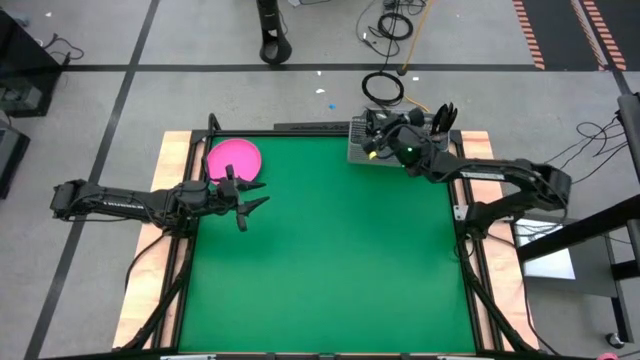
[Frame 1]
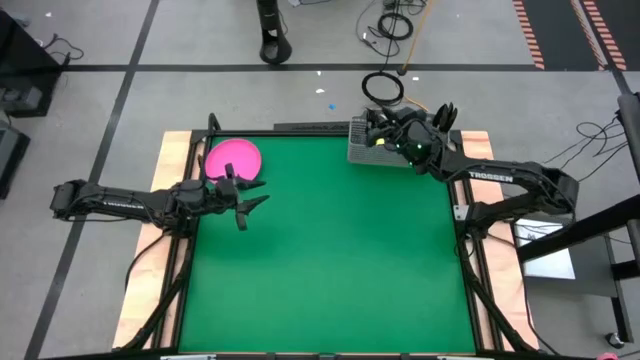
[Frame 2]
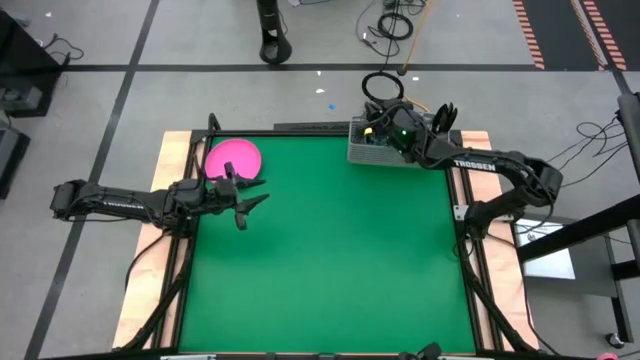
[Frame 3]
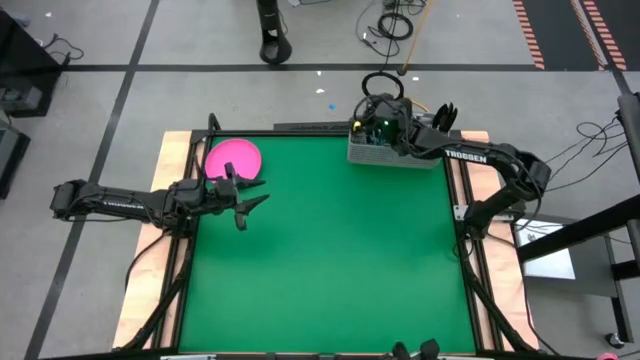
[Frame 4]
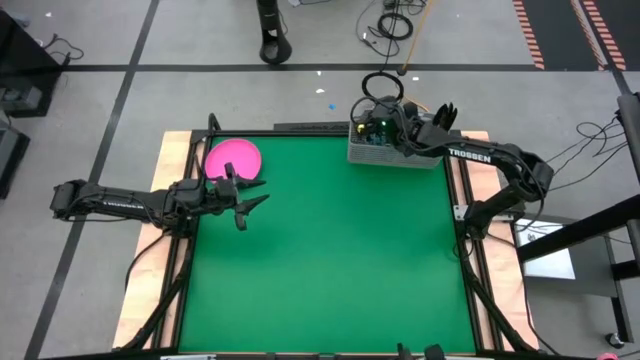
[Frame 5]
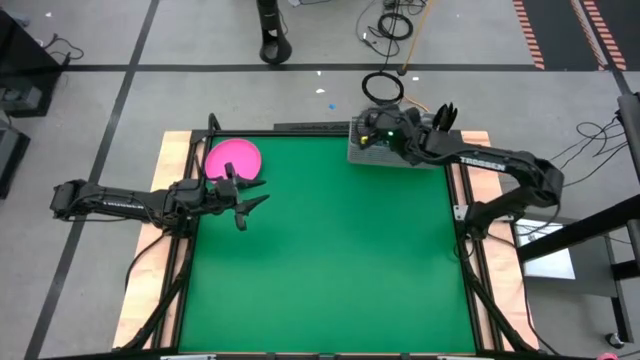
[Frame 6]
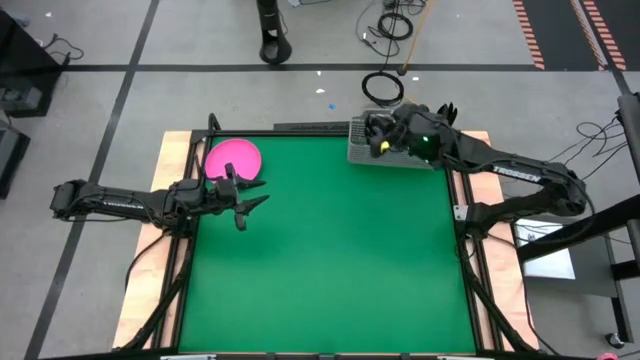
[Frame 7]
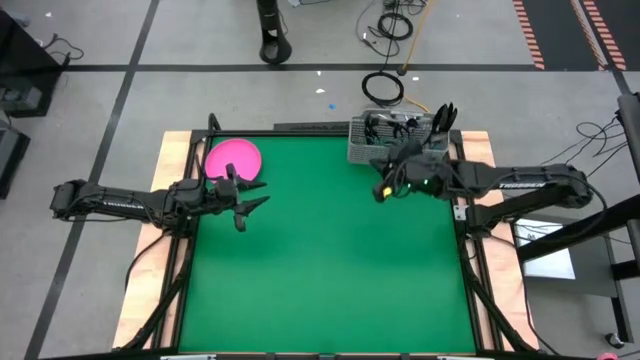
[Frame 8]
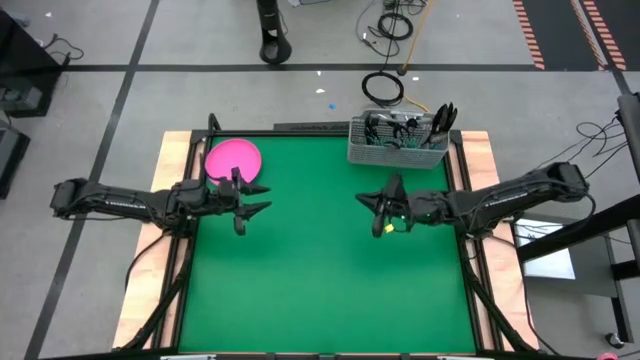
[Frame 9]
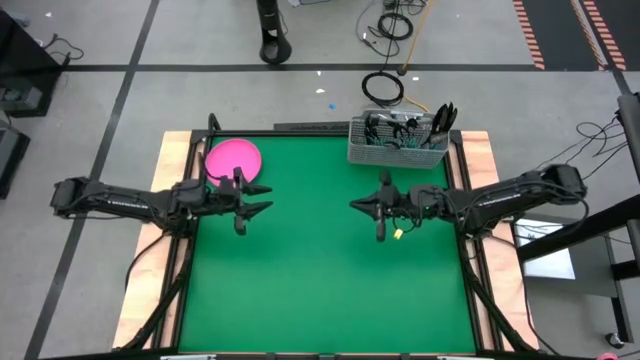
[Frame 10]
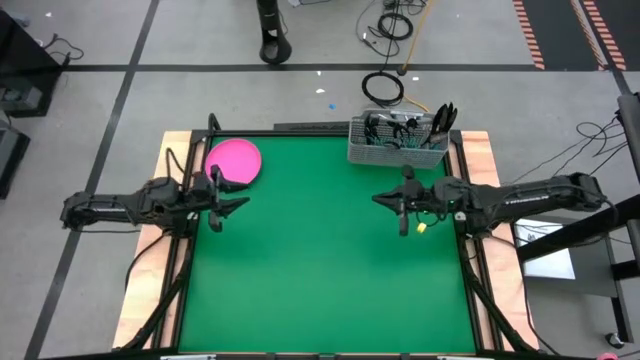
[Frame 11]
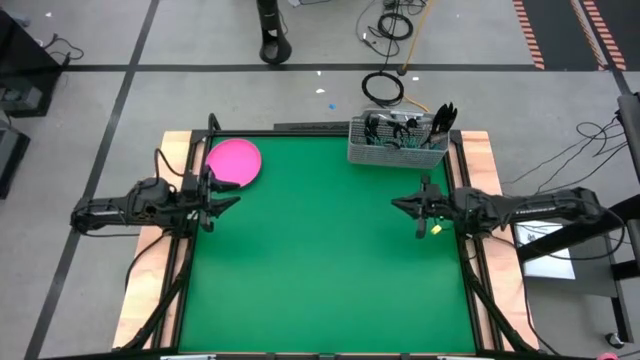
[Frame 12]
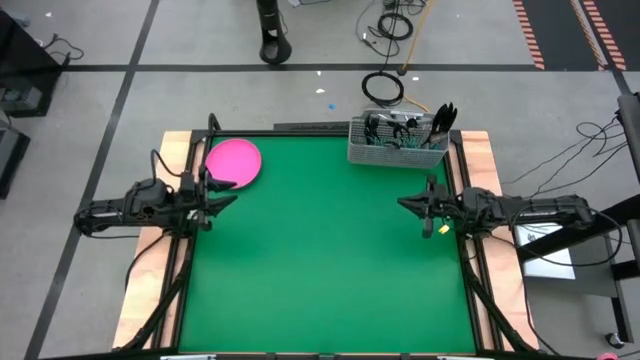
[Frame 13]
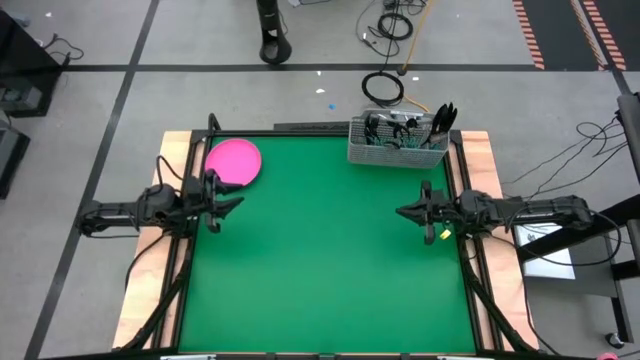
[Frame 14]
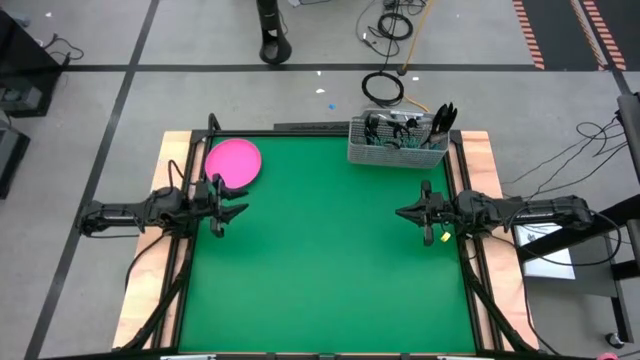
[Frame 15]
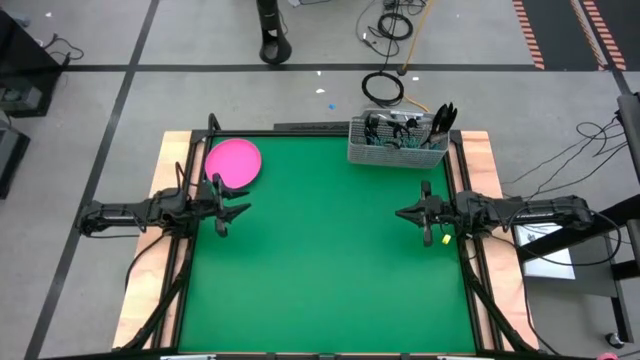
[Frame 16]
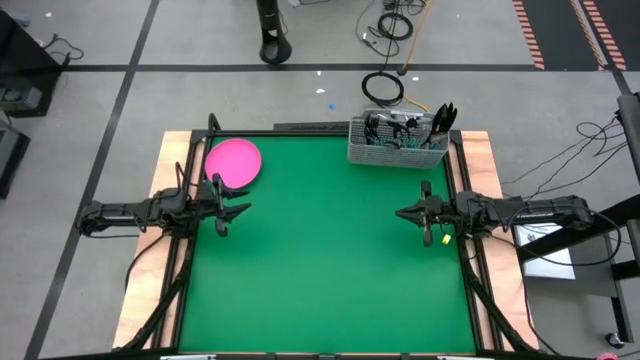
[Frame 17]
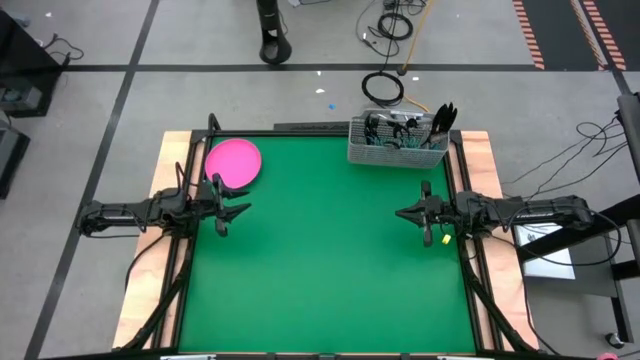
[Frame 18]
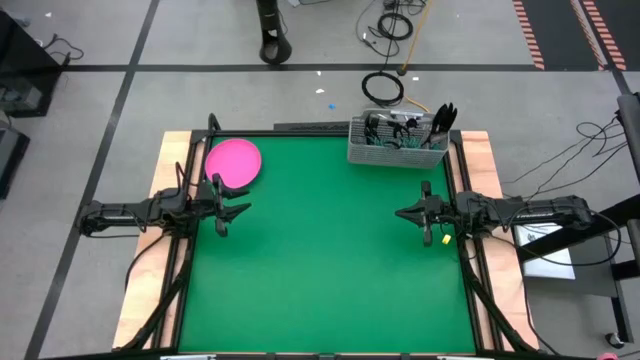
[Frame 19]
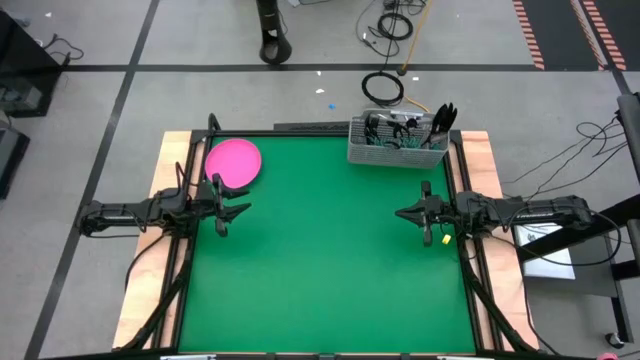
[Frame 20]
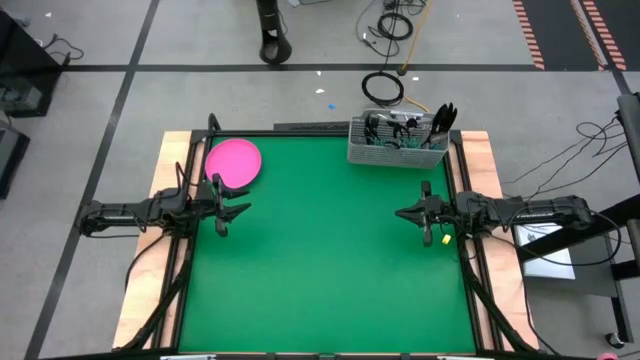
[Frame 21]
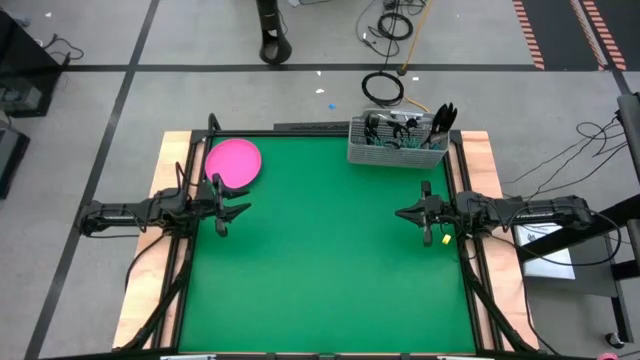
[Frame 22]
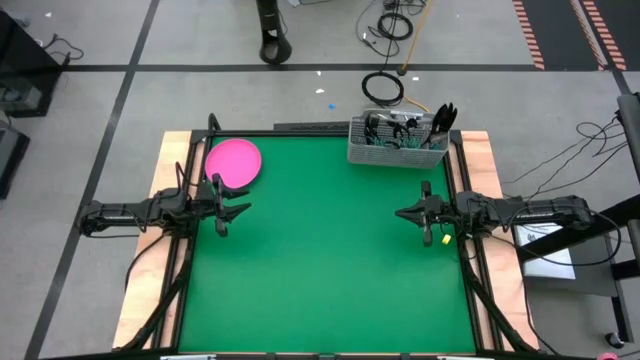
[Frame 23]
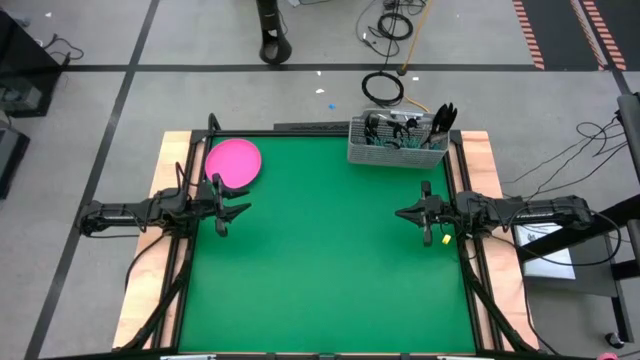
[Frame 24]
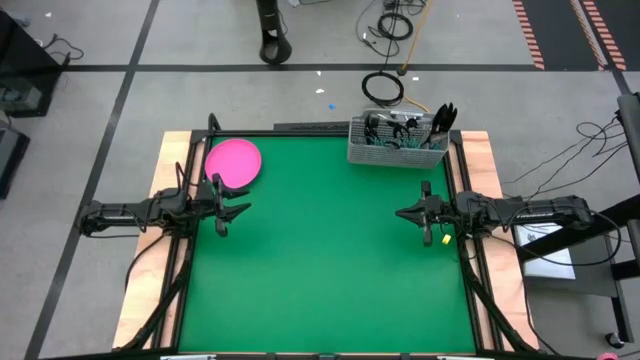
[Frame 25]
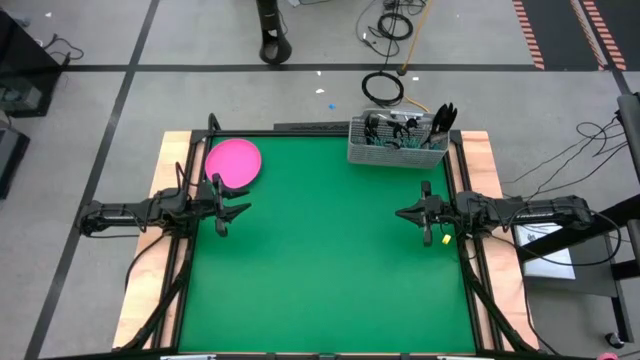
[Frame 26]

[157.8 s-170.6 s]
Task: Sort silverware
Return to Home Position

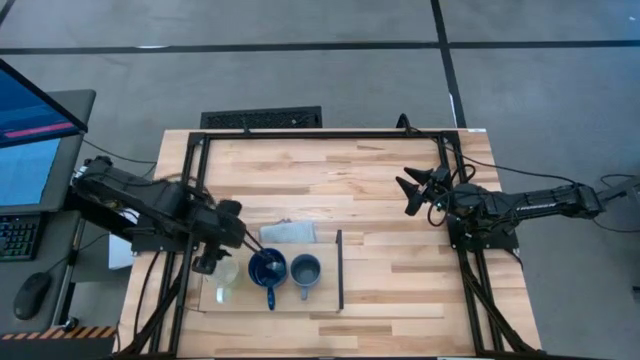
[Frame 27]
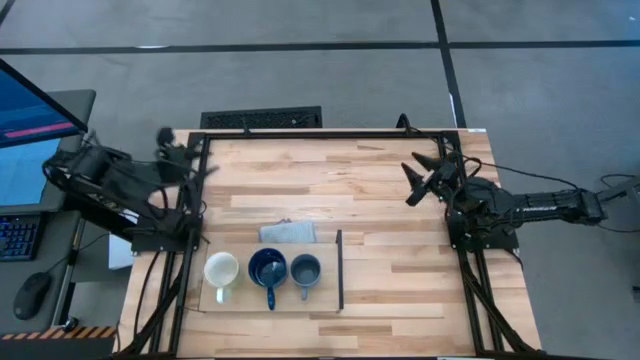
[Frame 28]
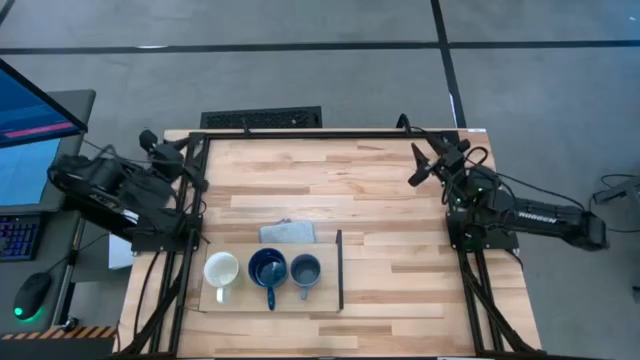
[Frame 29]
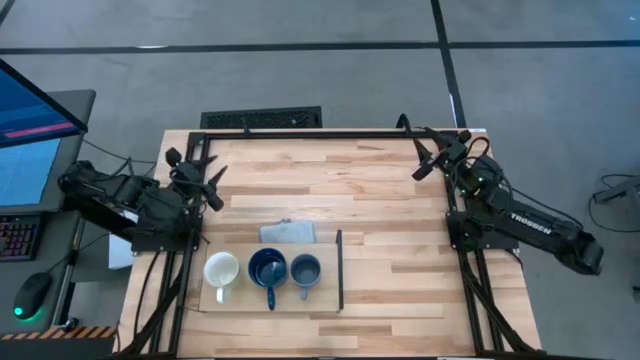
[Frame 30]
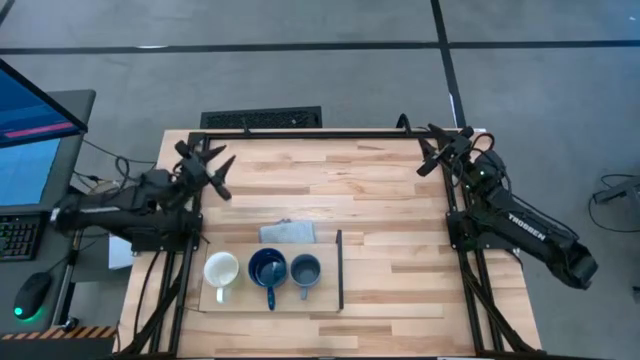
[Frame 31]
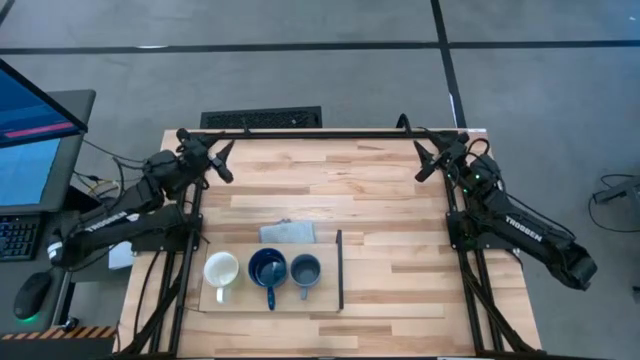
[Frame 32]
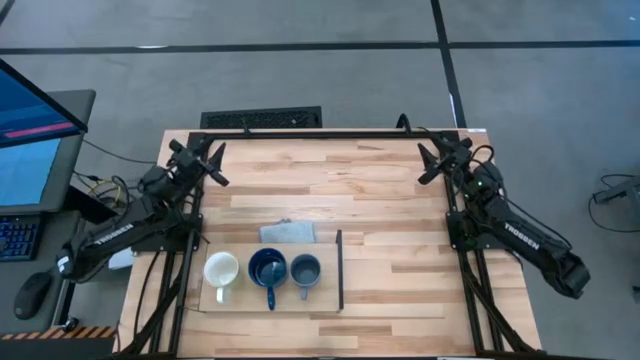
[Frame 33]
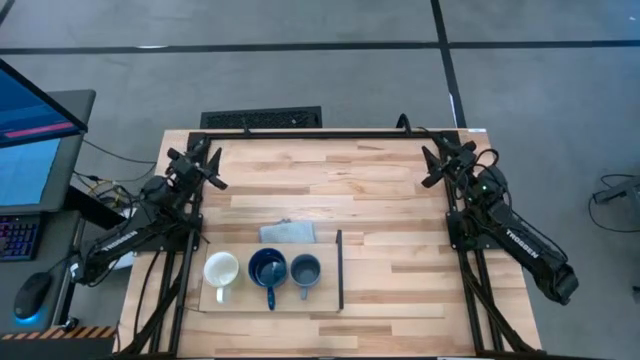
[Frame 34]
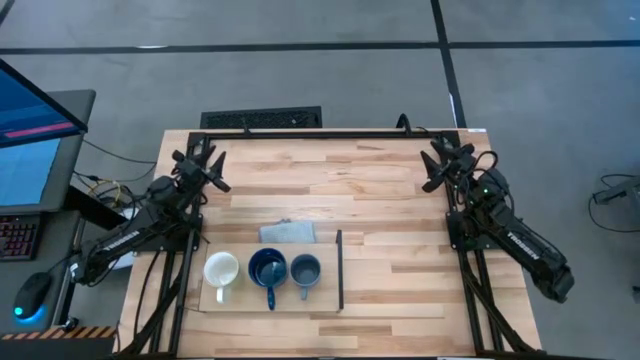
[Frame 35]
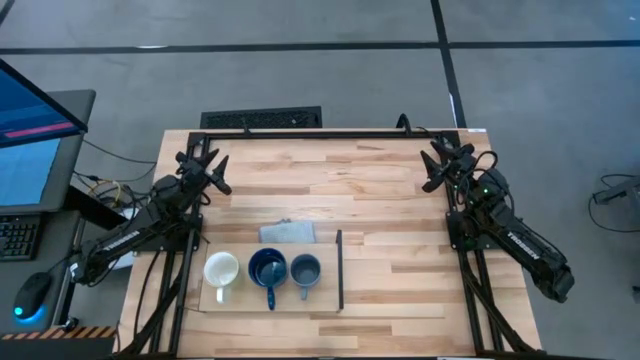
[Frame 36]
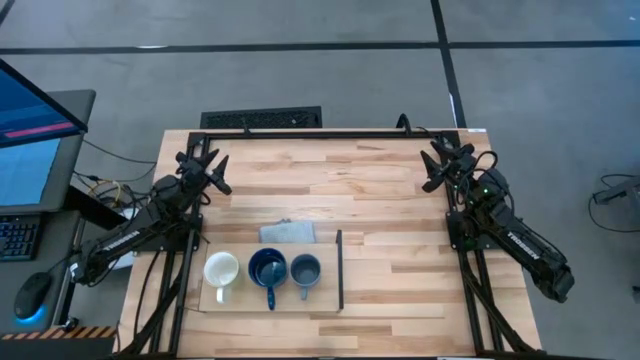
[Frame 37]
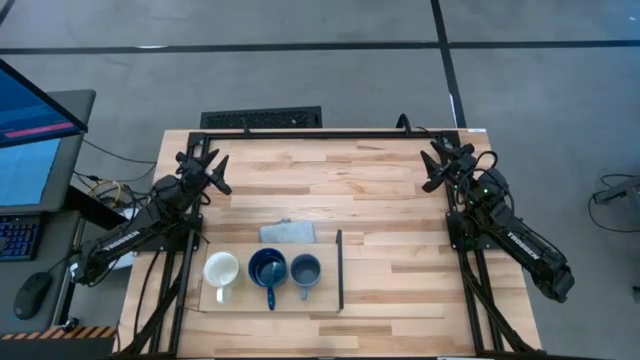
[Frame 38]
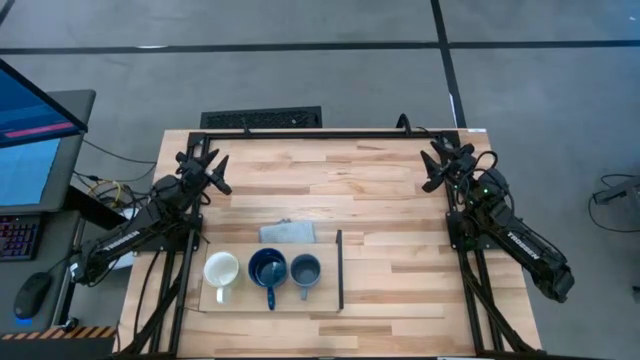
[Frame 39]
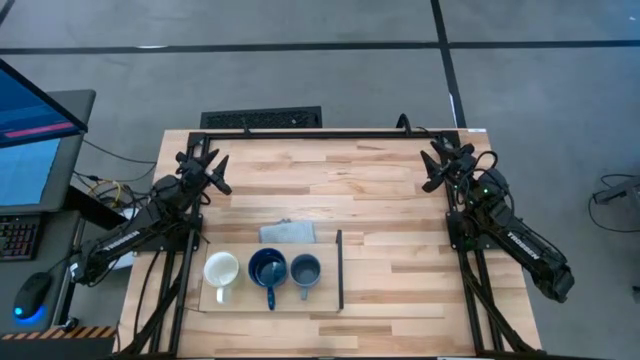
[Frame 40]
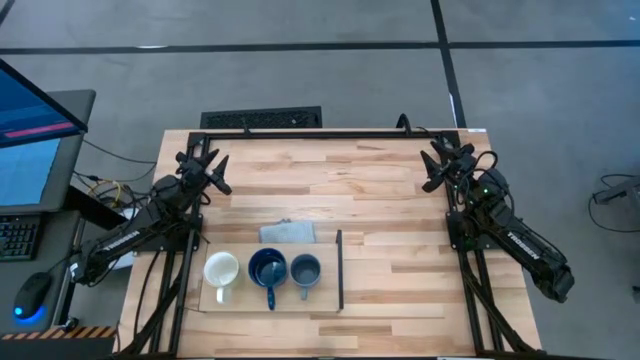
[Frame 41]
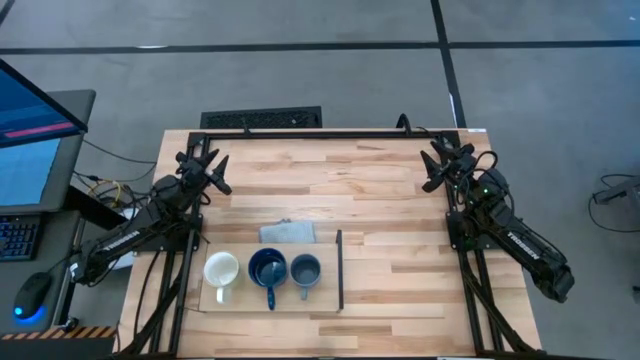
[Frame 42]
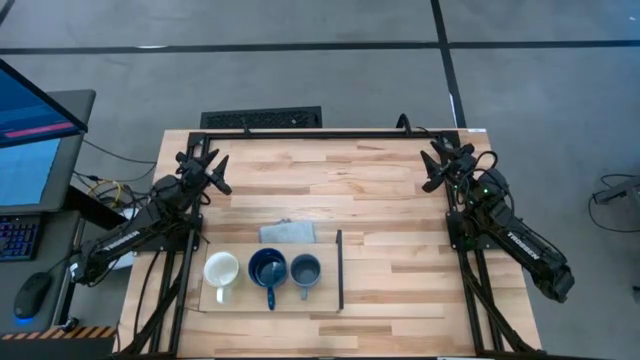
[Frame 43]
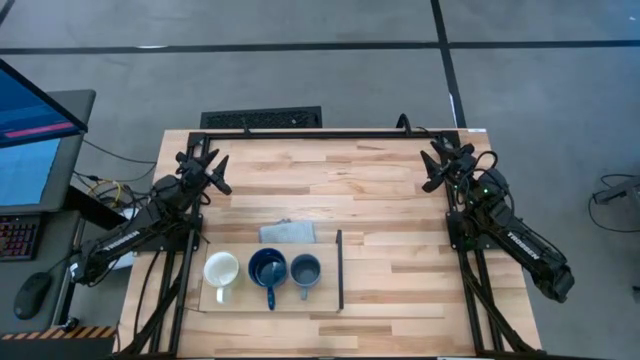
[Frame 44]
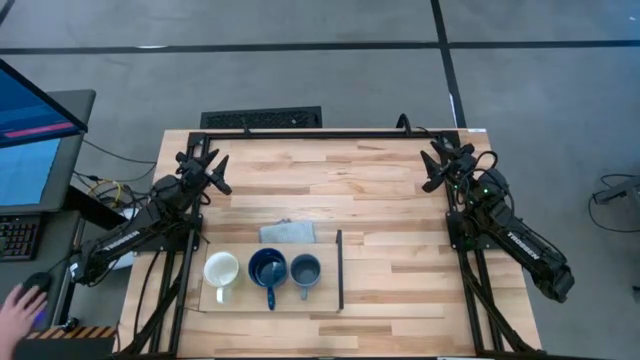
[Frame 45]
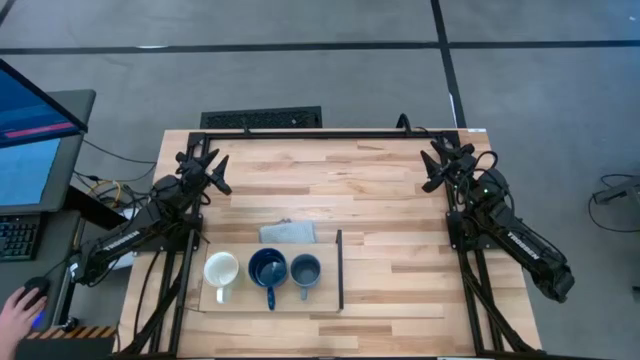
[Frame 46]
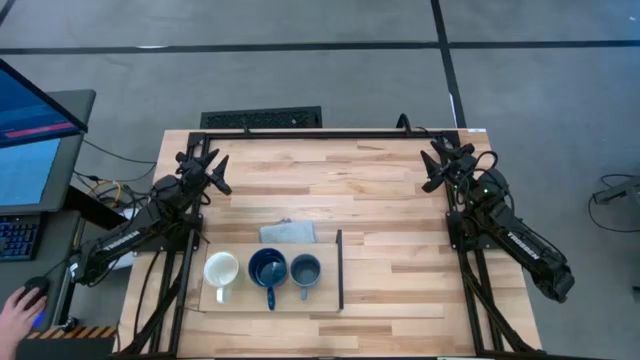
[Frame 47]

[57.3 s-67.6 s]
Task: Stack small to large cups/mugs on shelf
Return to Home Position
